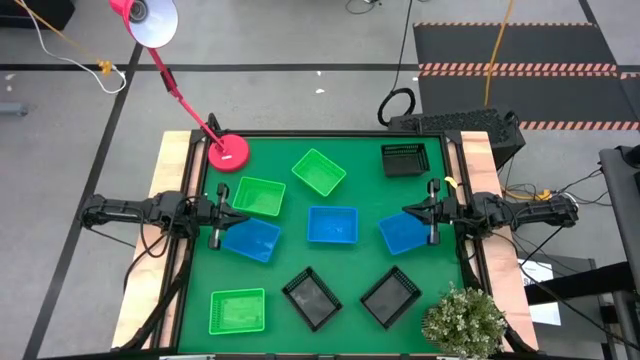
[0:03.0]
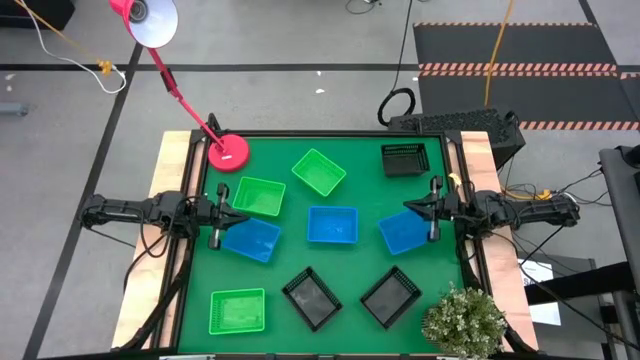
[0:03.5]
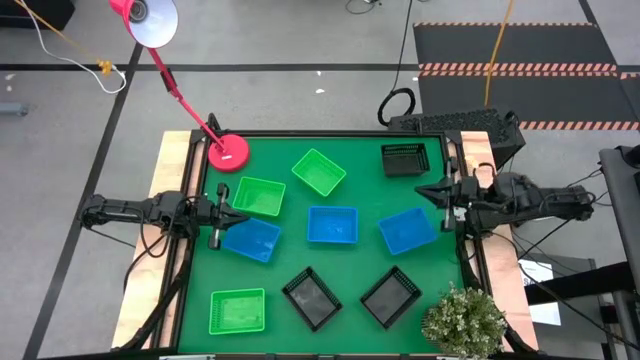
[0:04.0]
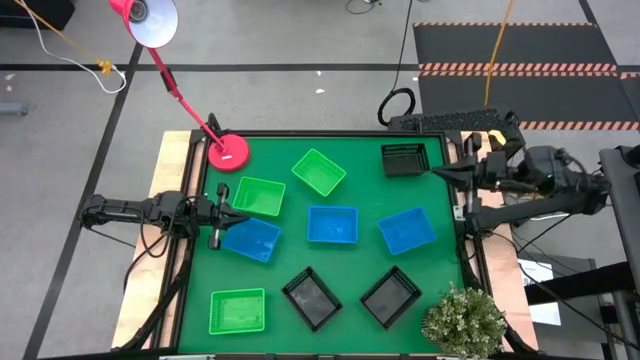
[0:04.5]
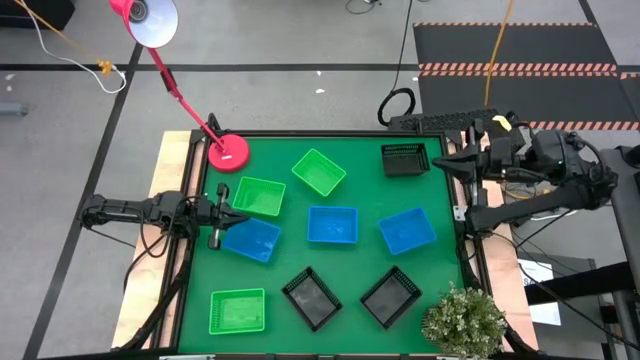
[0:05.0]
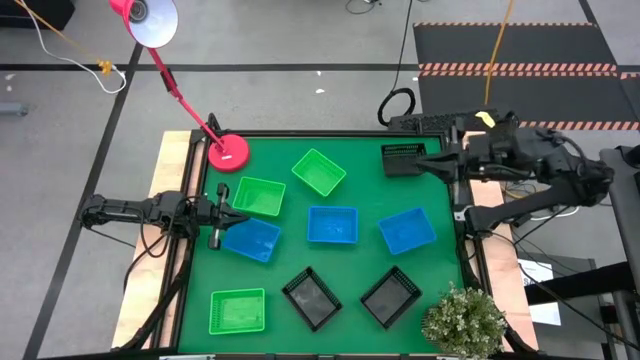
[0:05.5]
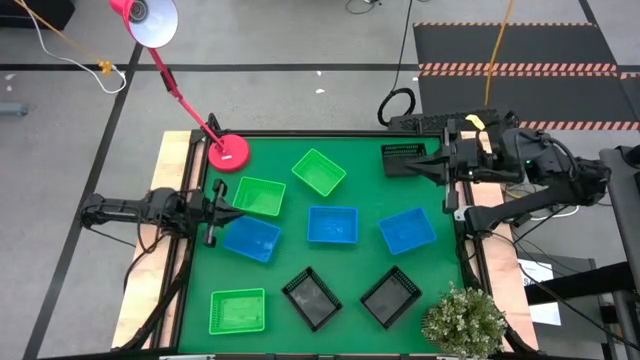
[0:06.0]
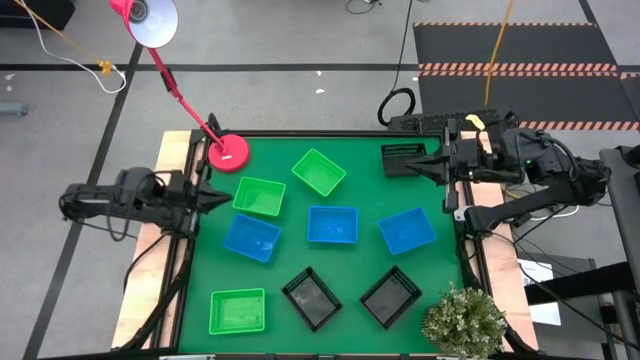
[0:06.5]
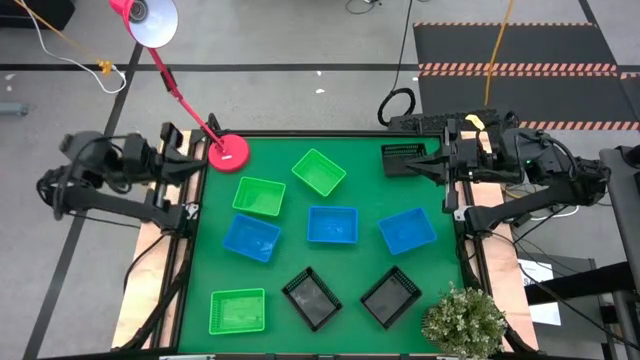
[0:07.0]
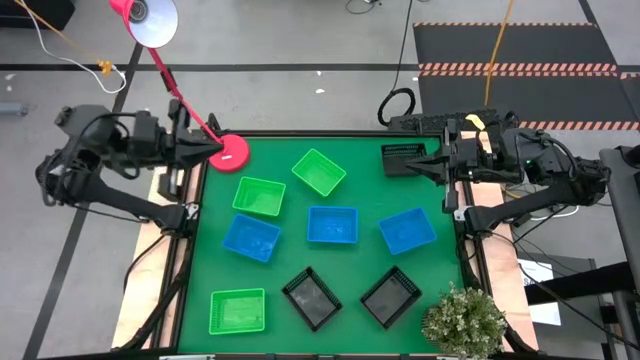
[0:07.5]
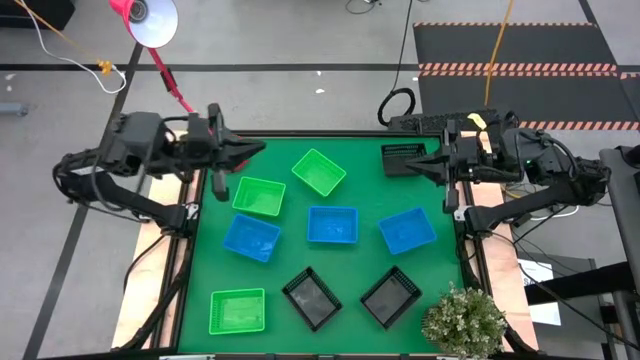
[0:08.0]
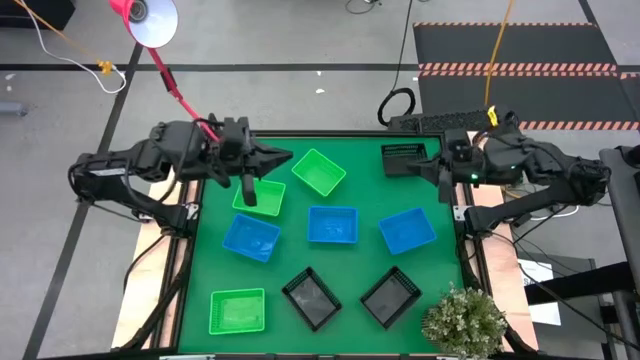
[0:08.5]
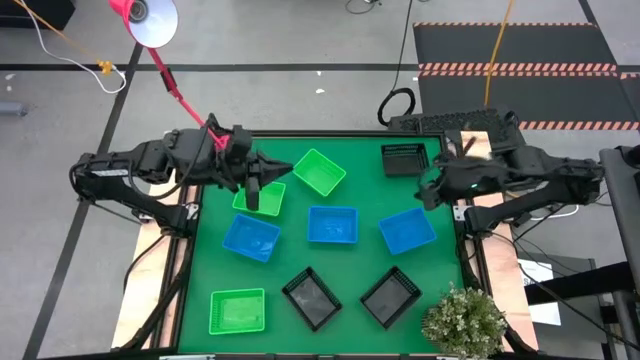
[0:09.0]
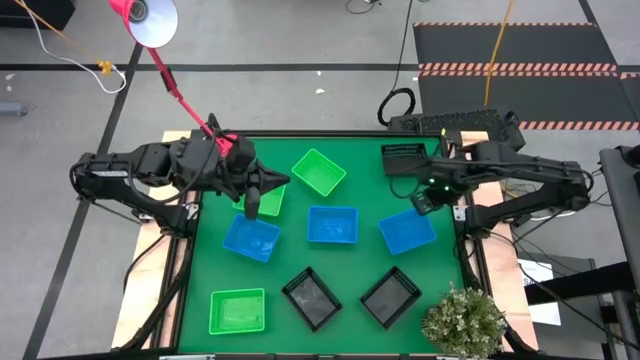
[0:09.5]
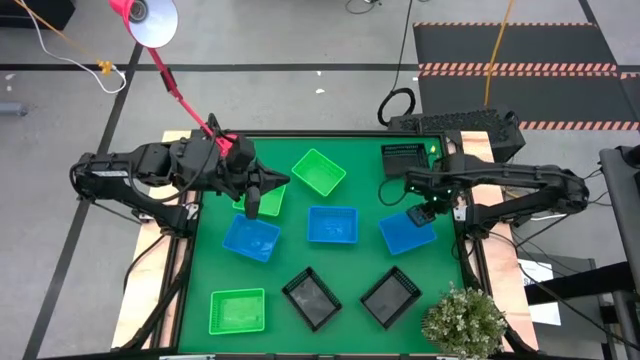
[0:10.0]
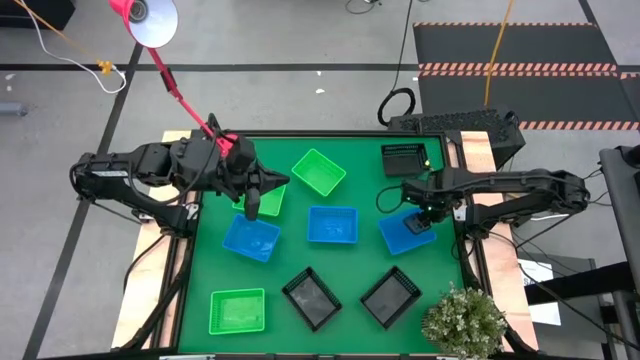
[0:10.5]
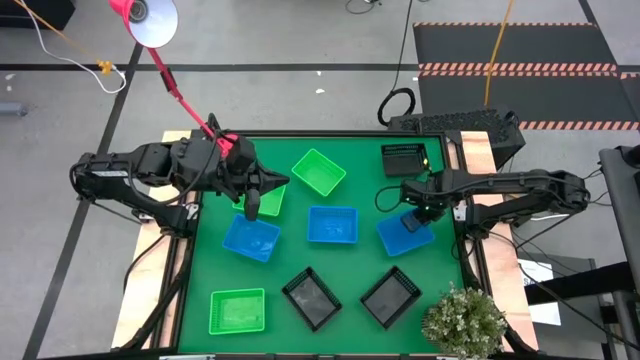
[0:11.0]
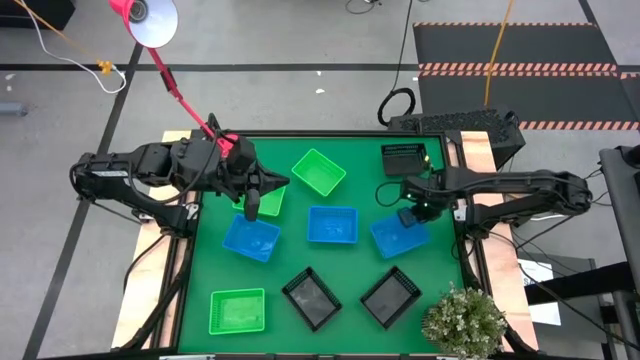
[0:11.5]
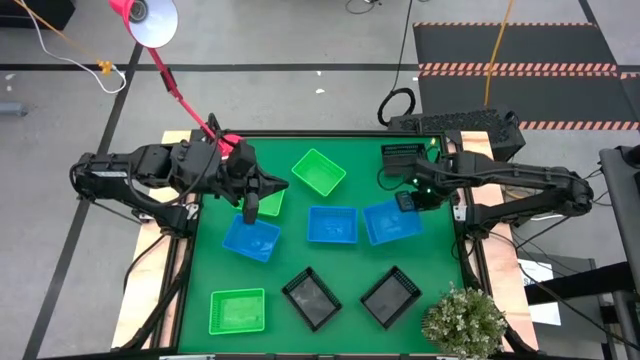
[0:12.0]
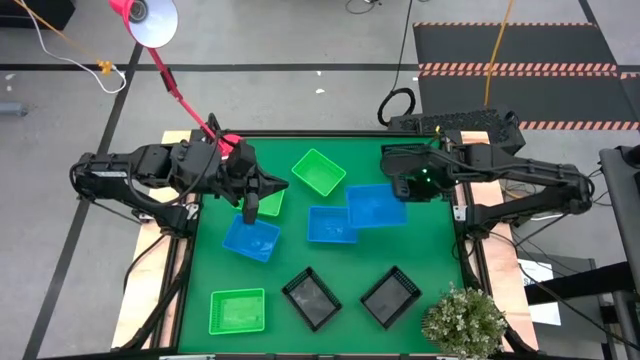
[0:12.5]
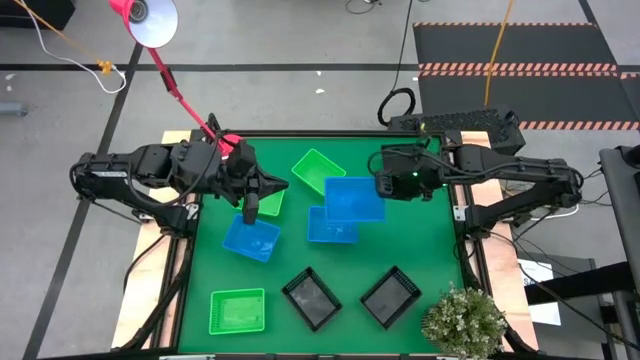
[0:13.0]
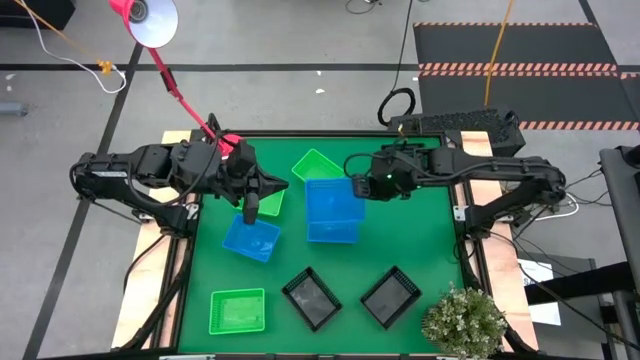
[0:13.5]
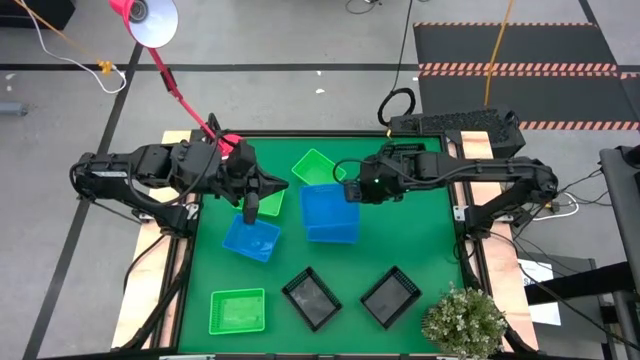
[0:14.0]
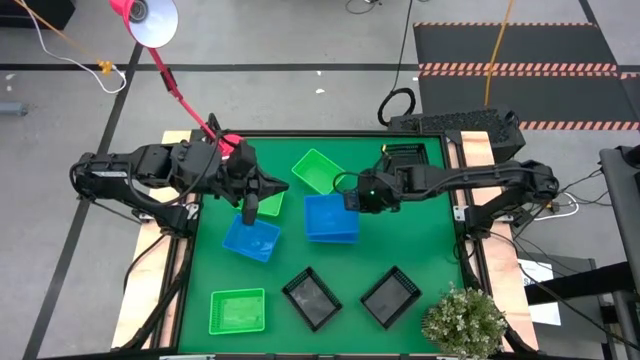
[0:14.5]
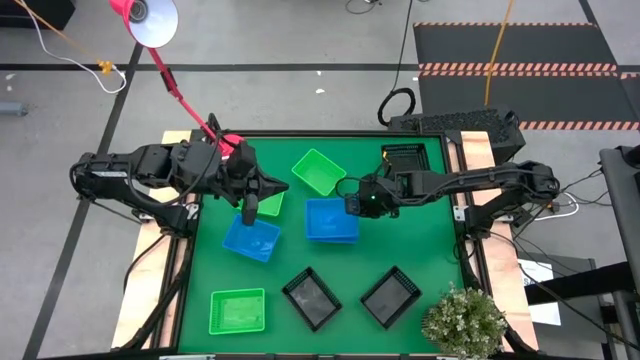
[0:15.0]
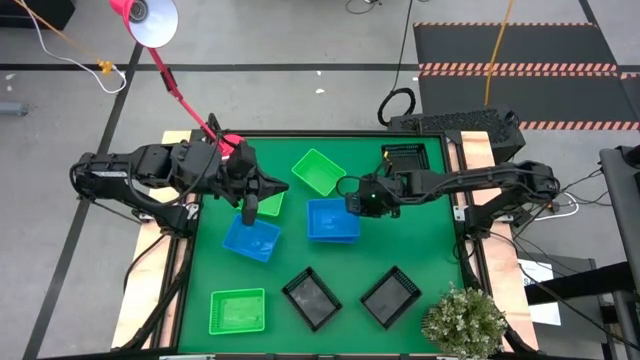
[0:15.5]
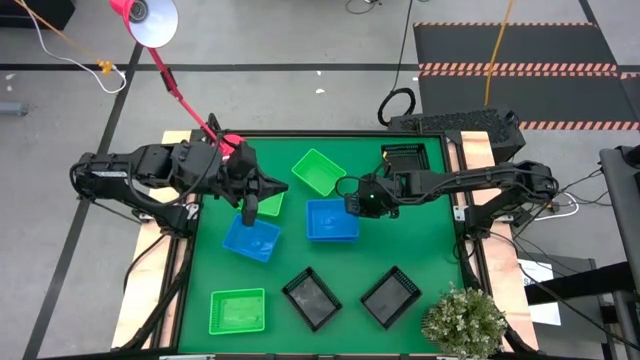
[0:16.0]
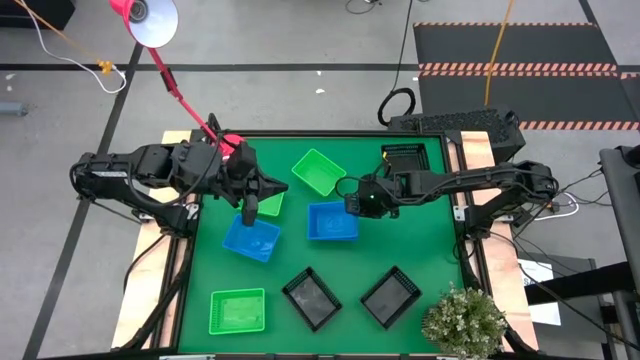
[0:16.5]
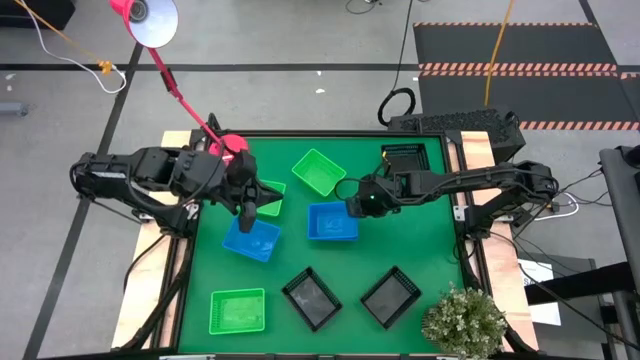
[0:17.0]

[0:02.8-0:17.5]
Stack the right blue bin on the right blue bin

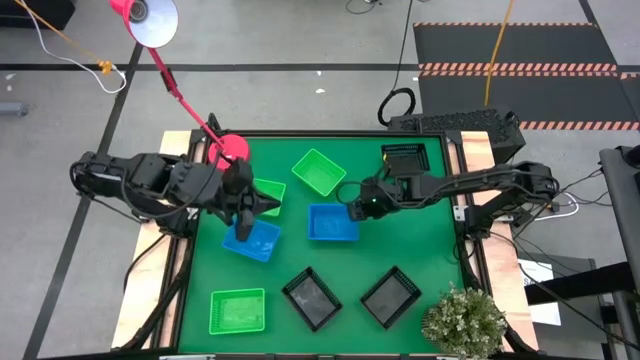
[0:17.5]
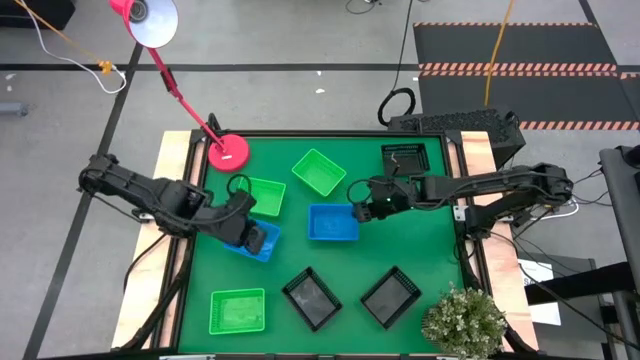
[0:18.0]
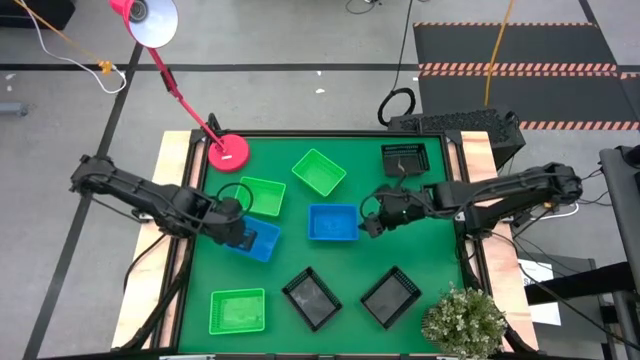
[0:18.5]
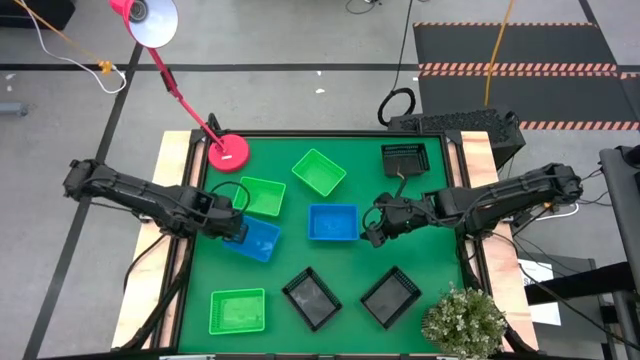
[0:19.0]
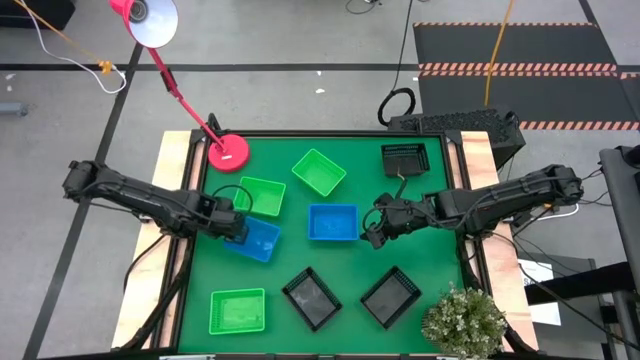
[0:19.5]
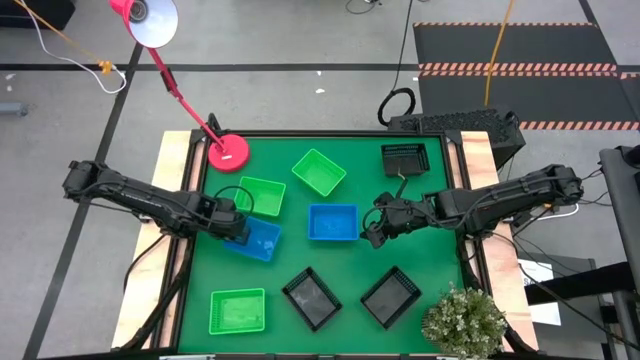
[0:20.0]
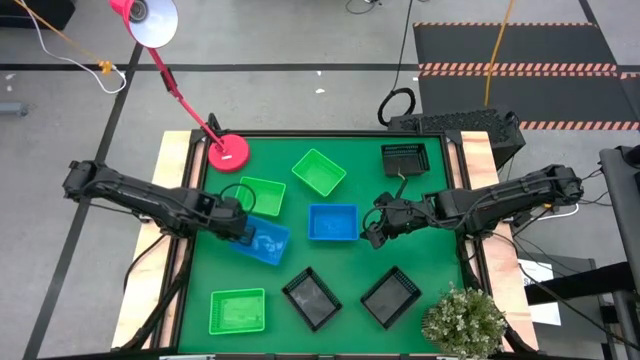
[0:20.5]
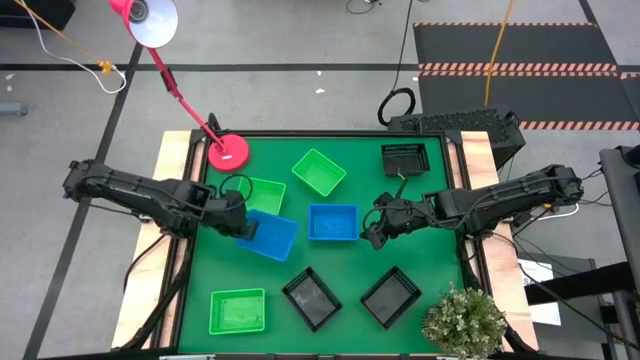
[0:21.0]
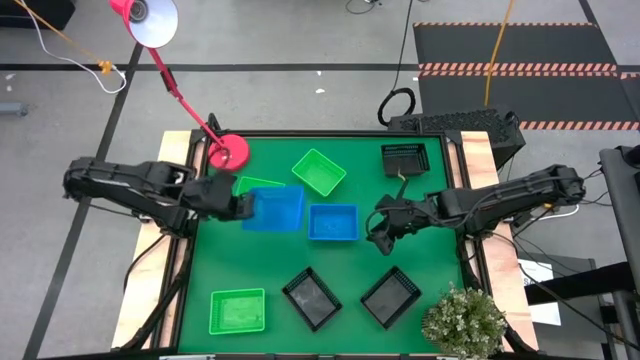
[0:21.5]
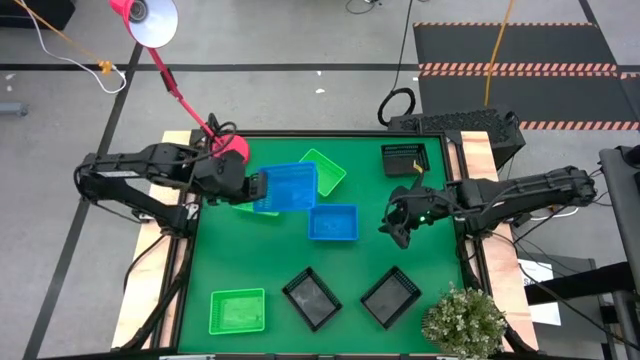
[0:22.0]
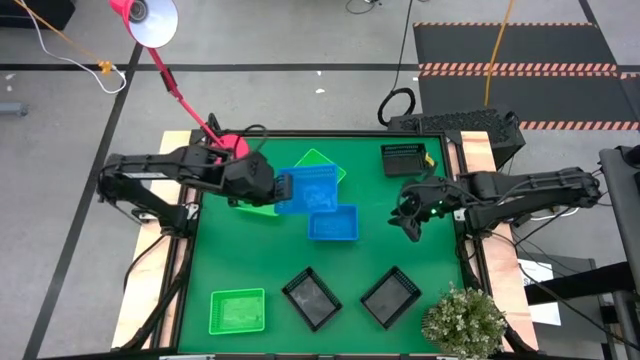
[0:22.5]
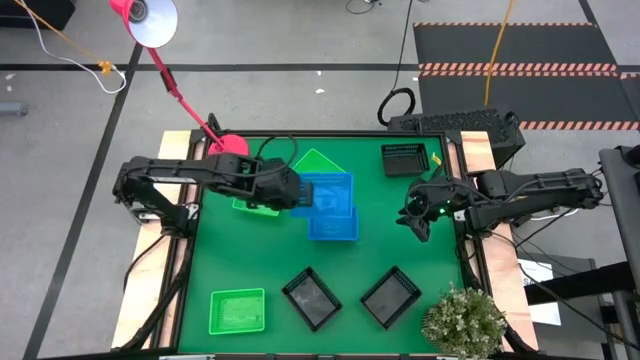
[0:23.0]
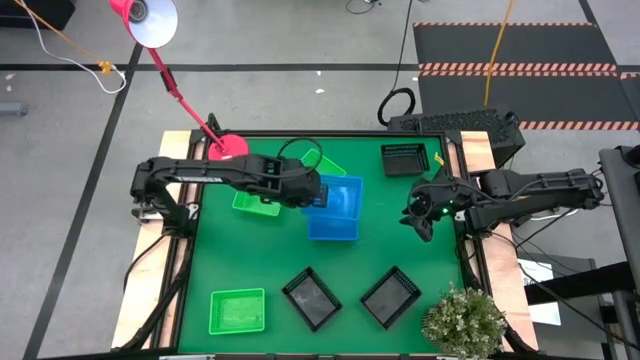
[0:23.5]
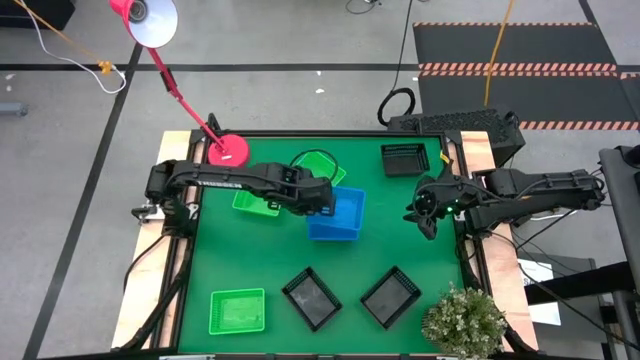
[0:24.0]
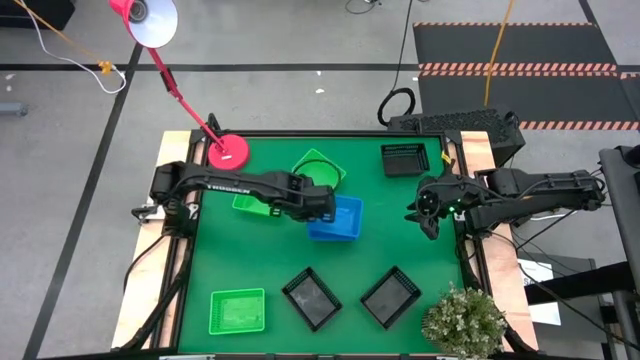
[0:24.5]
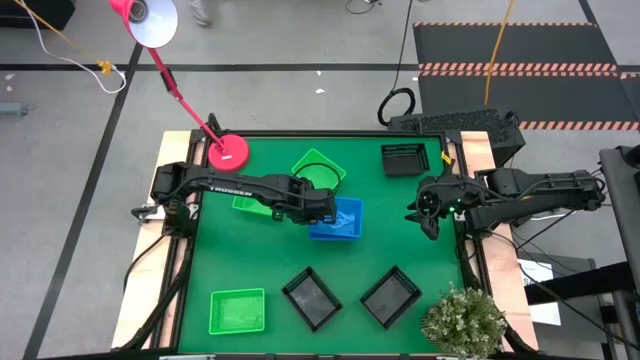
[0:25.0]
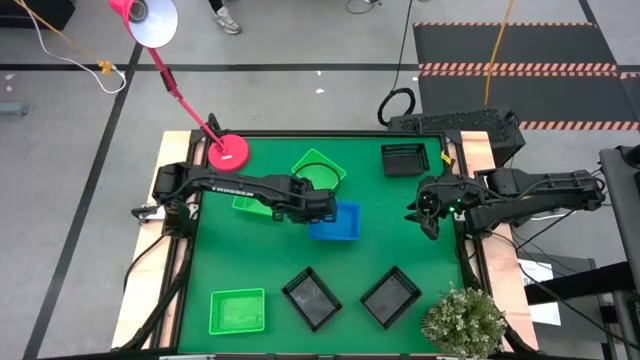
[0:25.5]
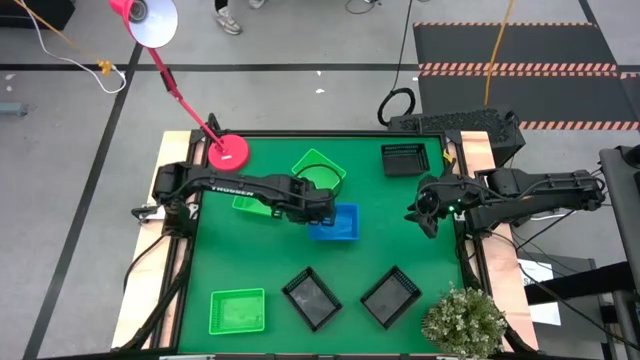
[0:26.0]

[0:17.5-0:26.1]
Stack the left blue bin on the blue bins
